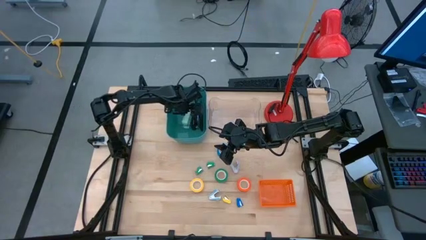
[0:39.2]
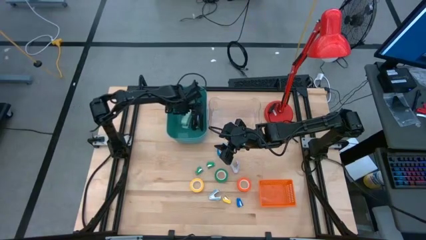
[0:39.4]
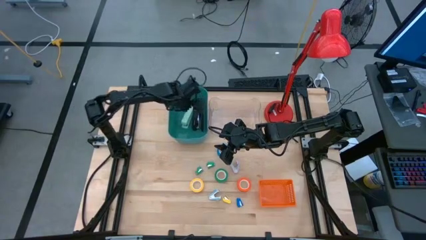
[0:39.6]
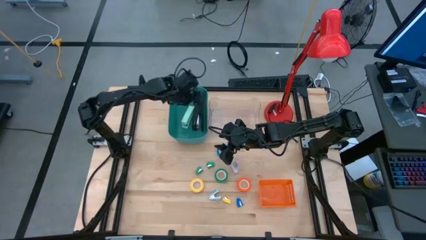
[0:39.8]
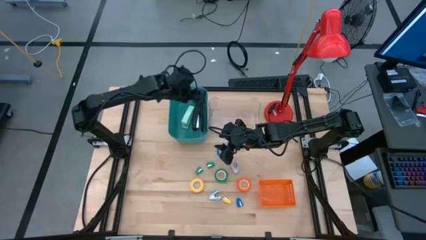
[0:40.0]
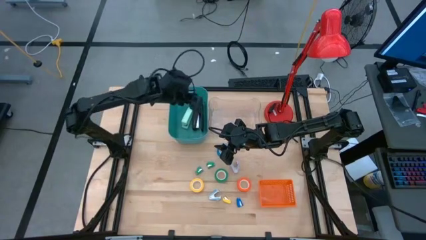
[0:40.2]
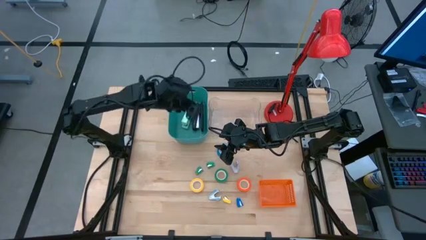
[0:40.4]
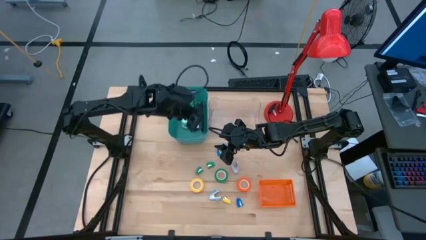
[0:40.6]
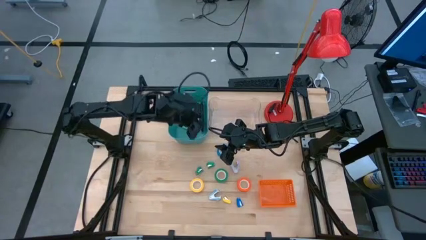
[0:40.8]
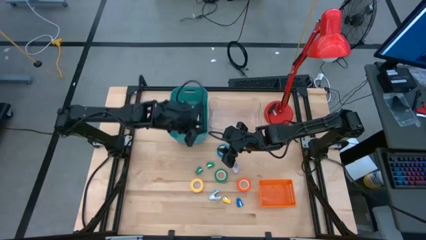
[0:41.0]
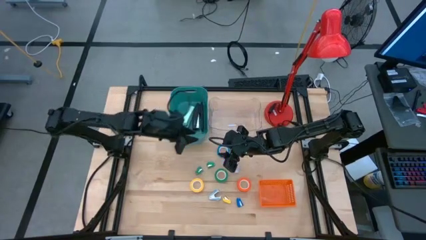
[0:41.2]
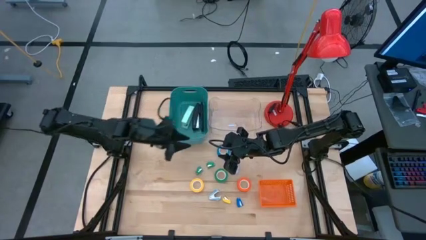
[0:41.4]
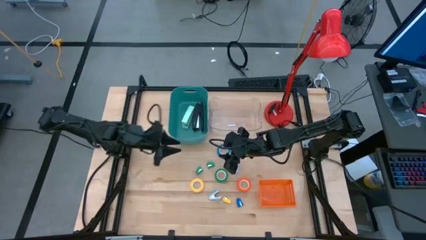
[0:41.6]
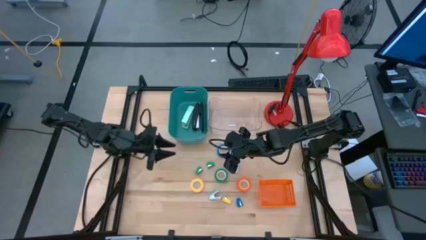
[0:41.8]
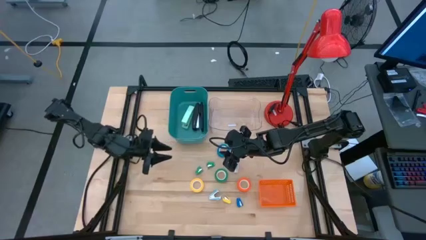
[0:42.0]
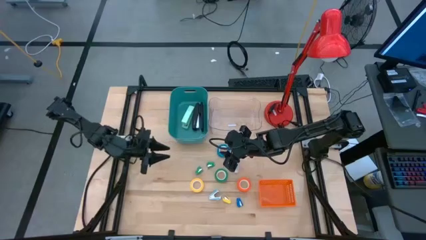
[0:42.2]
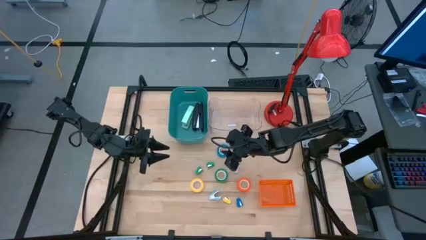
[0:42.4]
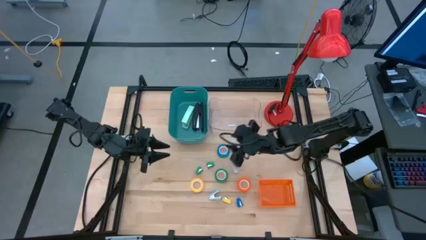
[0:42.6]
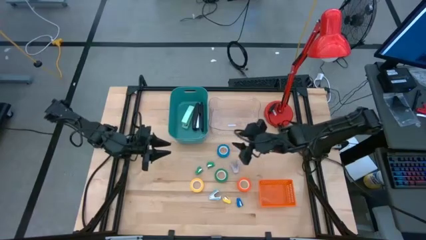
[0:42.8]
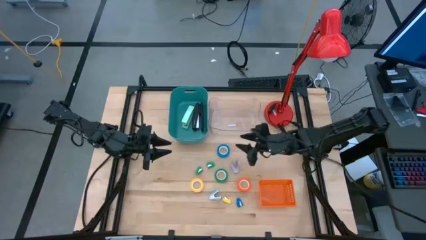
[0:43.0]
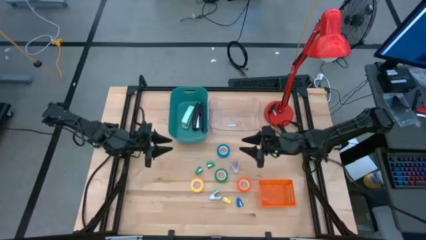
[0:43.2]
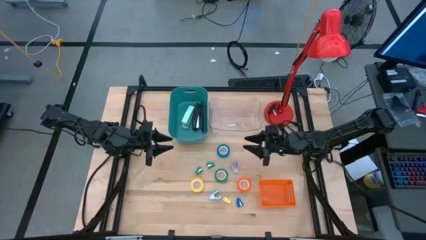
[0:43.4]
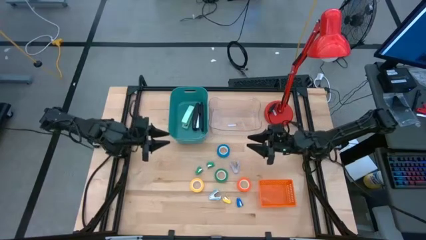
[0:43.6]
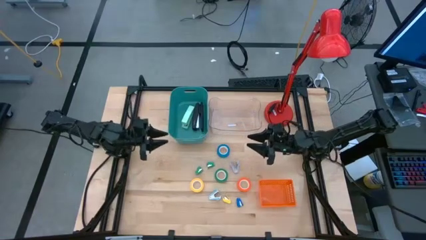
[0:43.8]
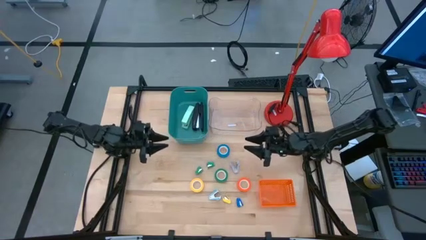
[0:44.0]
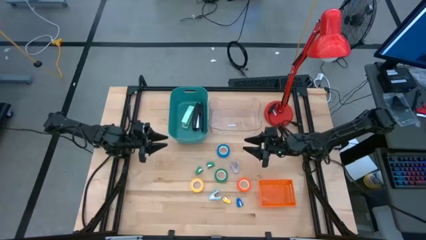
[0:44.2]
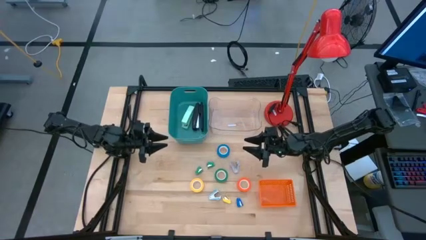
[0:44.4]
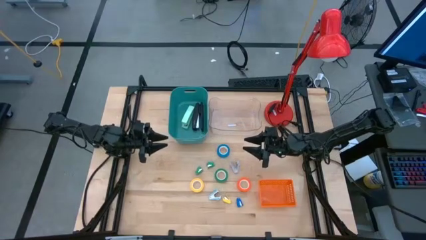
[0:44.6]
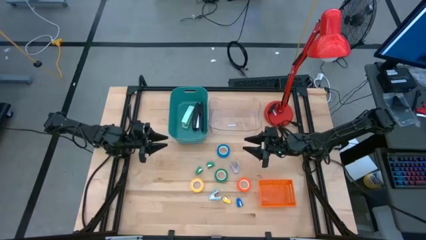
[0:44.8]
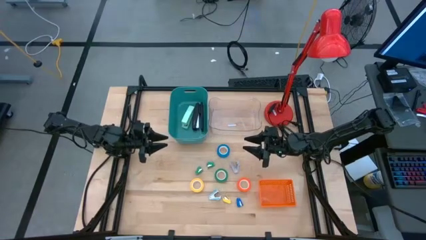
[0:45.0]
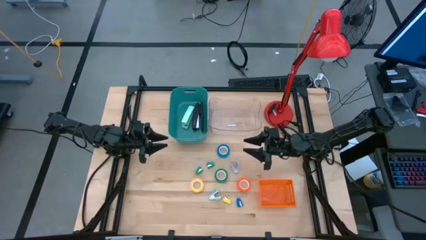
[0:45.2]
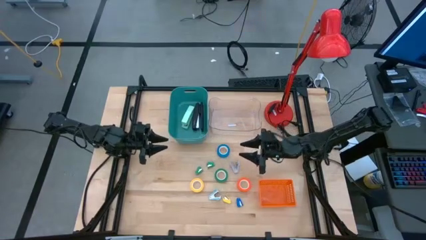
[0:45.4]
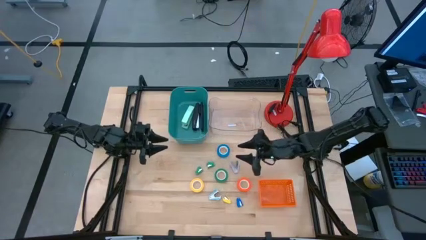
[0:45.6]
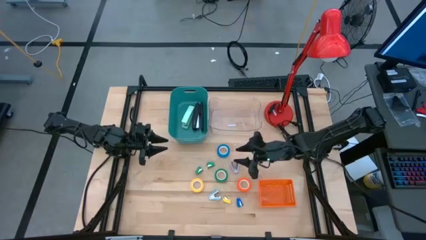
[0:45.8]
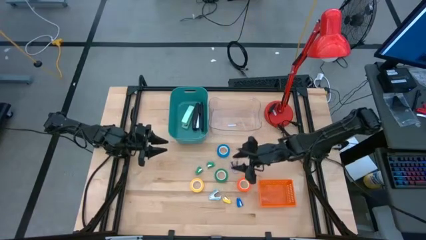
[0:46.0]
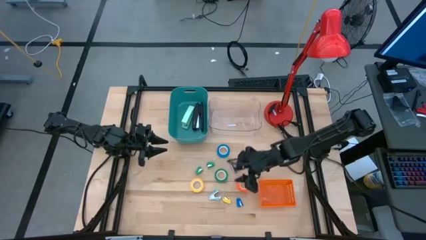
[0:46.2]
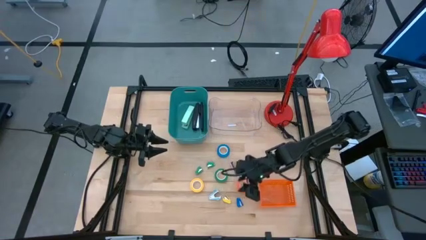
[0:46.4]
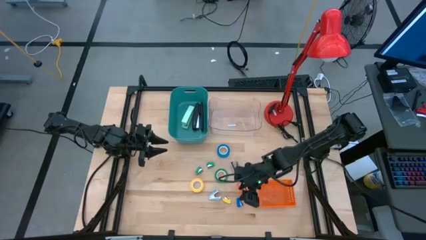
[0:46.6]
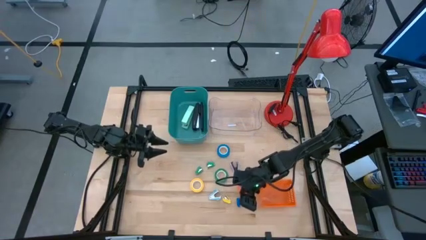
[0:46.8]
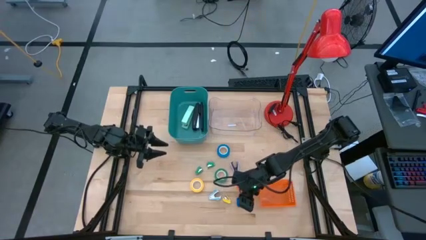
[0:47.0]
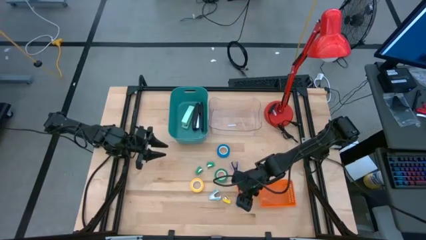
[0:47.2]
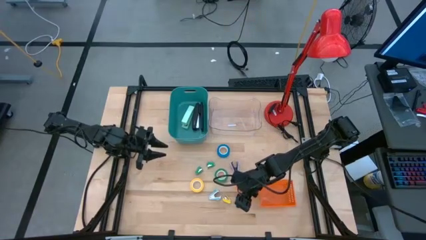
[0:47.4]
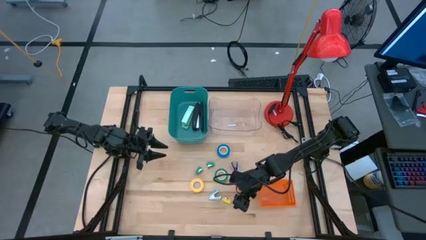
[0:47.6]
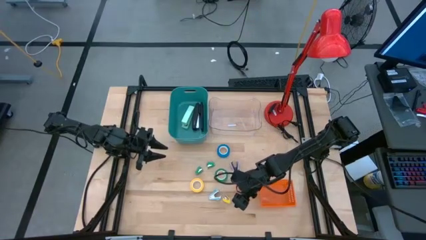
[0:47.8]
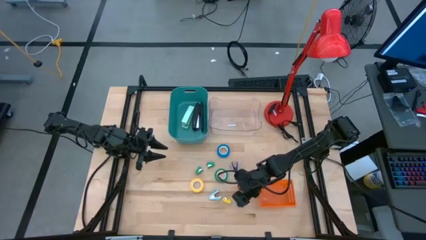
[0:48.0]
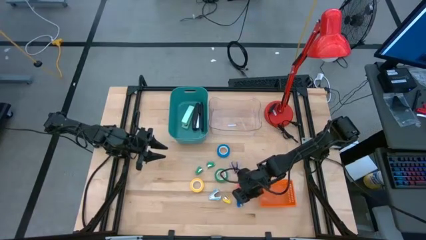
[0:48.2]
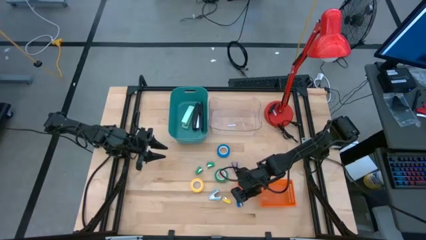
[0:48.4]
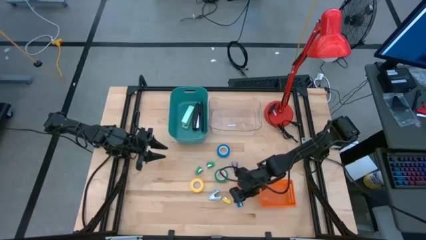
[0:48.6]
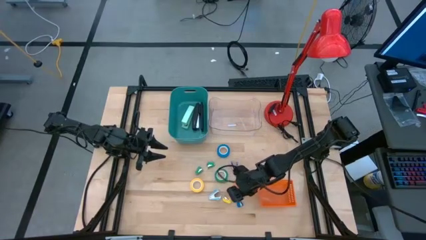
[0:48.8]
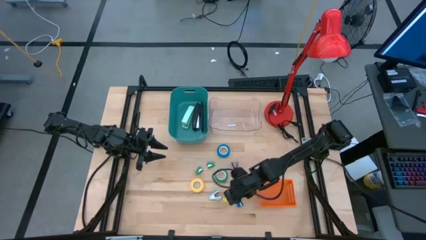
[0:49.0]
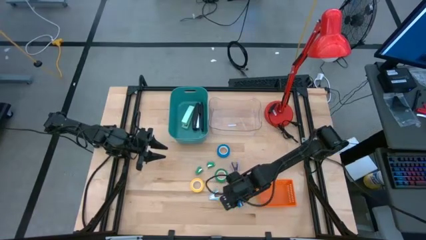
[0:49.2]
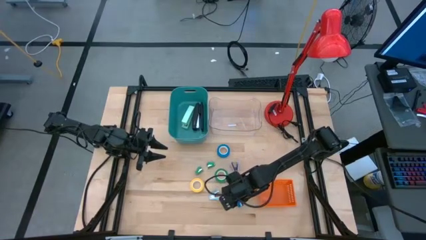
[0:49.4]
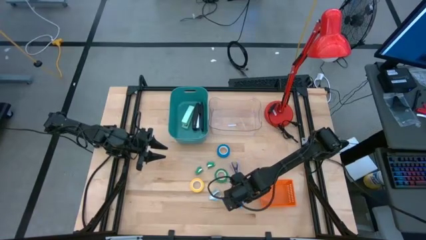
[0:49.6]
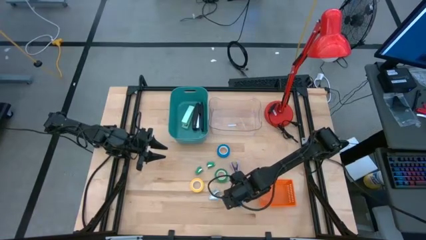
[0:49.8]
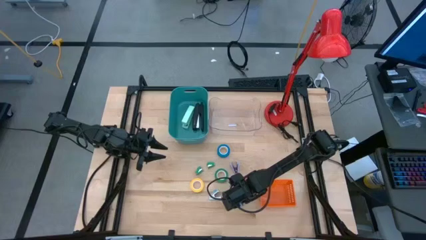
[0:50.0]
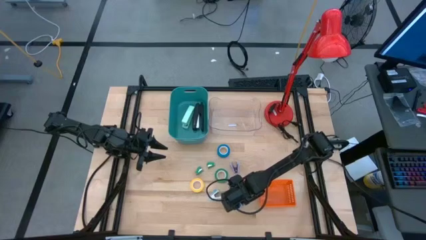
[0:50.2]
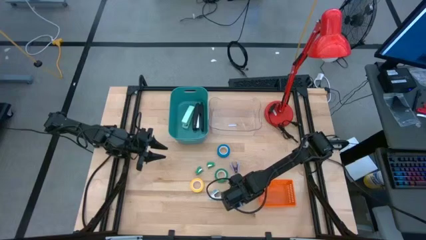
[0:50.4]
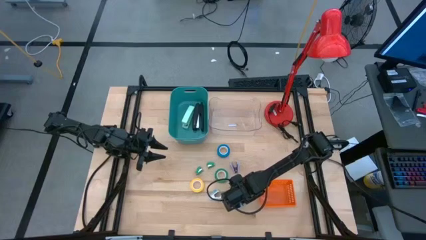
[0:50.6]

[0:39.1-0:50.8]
Task: Pick and place Stapler, Stapler remover, tape
Put the small blue stapler into the blue bin
